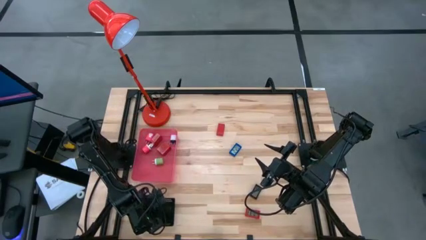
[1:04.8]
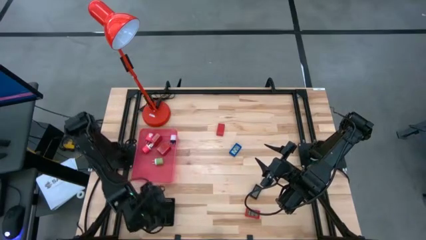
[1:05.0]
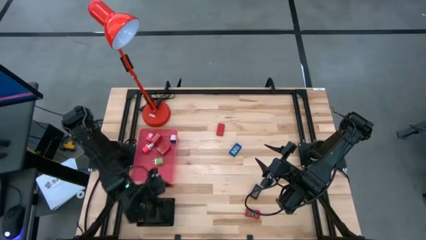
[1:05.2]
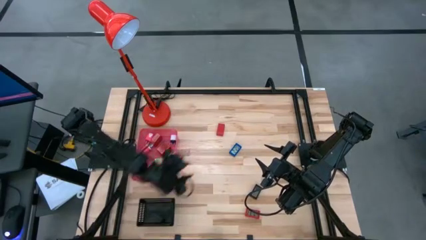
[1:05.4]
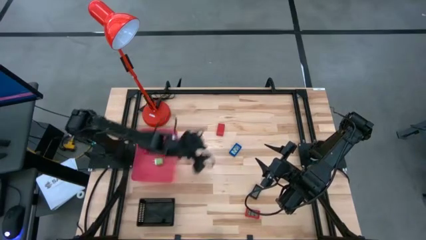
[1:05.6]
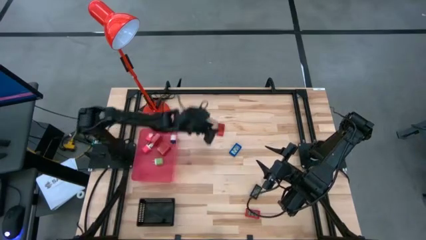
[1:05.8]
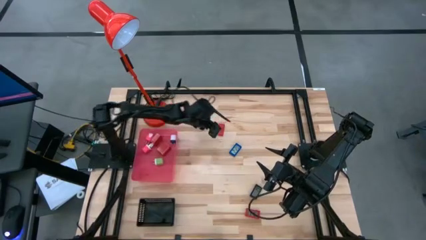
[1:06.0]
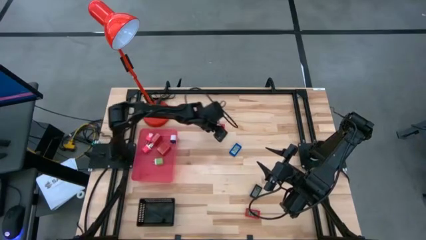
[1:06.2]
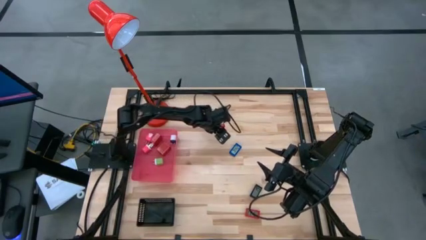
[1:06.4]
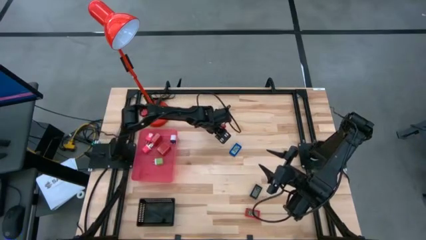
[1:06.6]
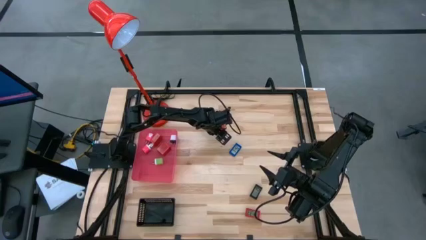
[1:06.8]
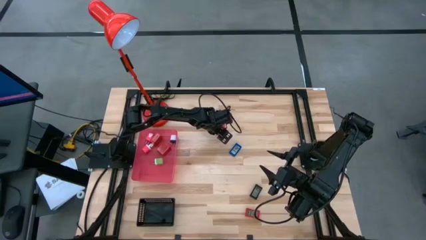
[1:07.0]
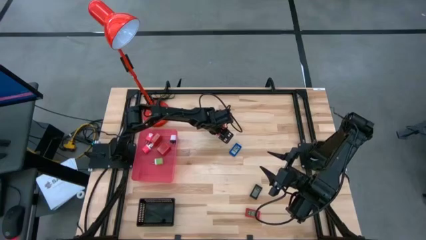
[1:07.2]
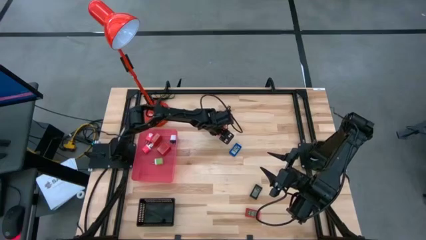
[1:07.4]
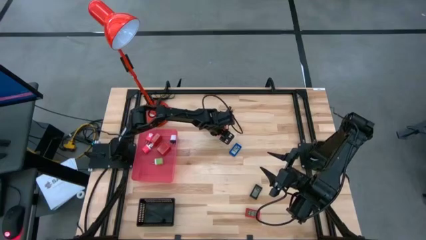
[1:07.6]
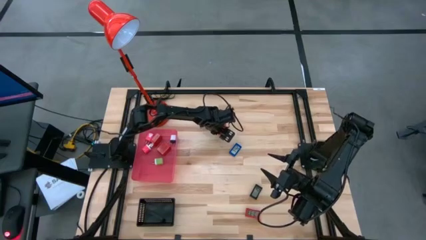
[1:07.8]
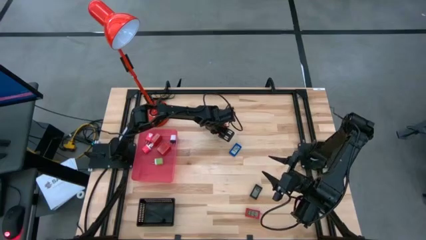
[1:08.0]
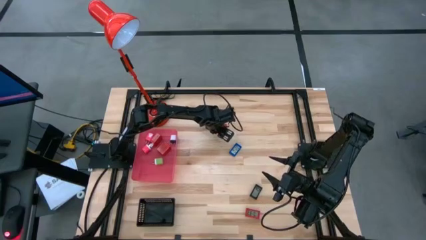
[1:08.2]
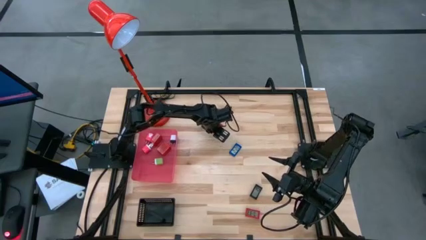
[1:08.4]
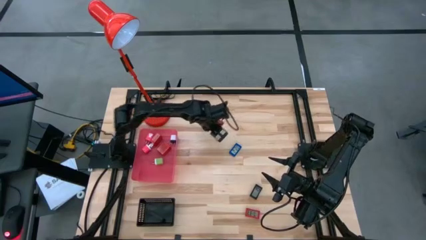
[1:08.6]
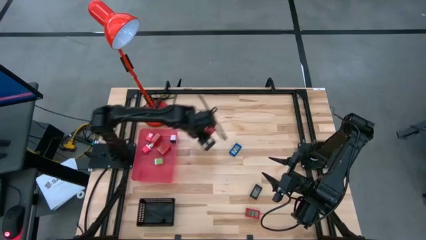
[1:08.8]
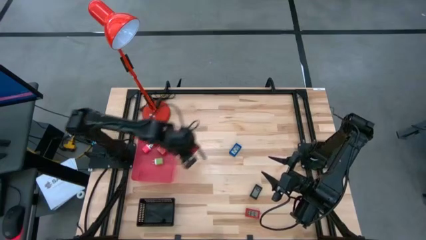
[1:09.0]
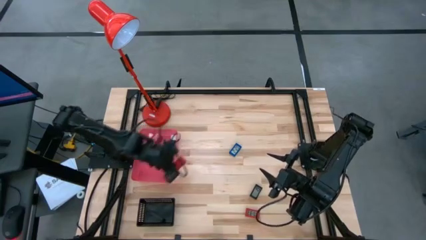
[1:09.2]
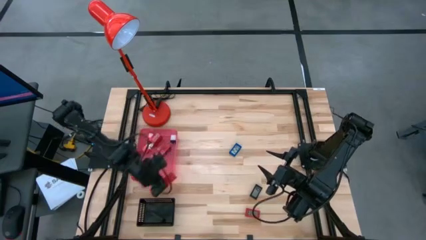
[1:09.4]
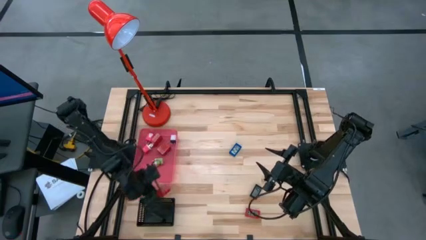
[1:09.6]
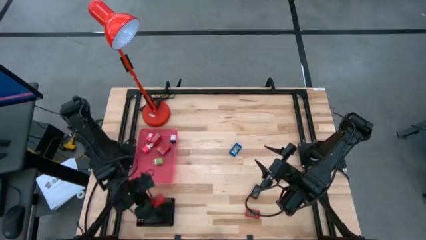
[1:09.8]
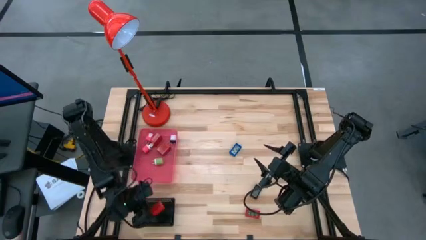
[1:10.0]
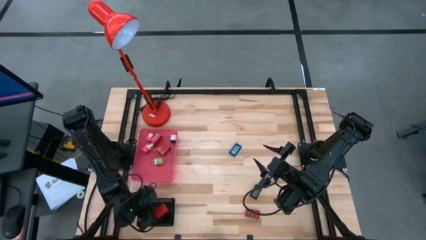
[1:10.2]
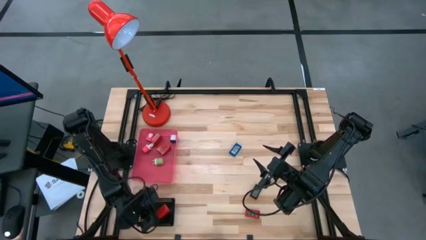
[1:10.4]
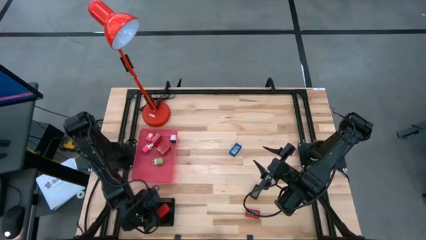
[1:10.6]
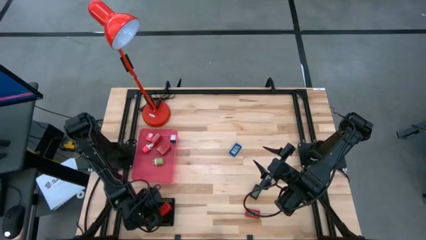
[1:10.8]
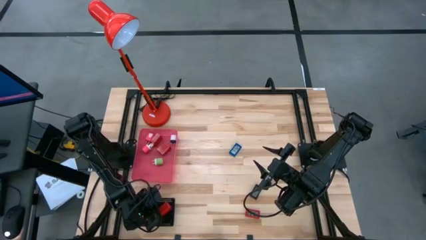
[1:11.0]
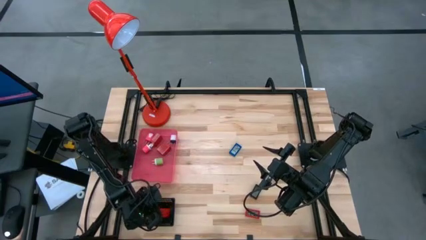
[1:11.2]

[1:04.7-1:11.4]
Task: Pick & Place Office items
Put the top red digital timer into the black bin

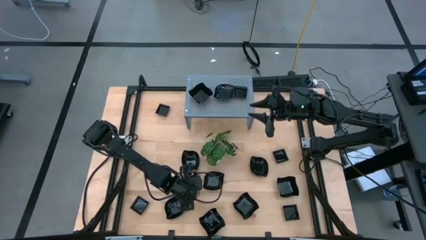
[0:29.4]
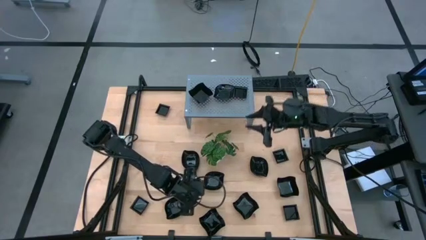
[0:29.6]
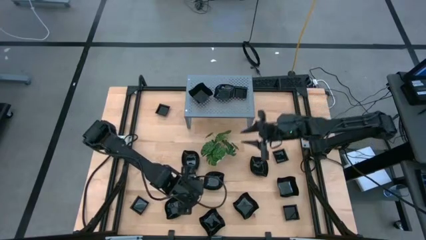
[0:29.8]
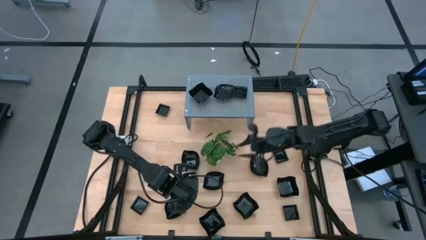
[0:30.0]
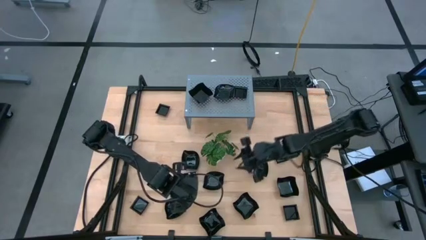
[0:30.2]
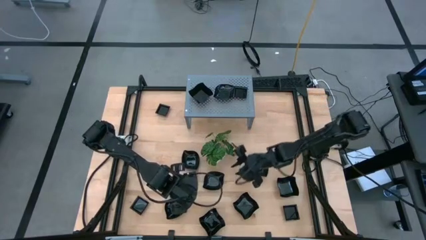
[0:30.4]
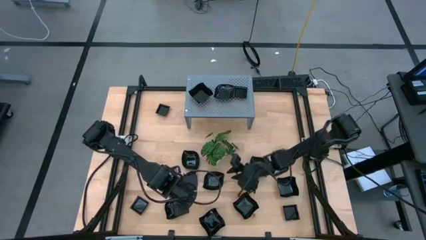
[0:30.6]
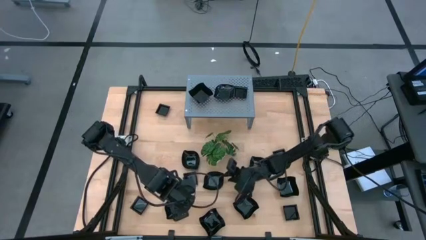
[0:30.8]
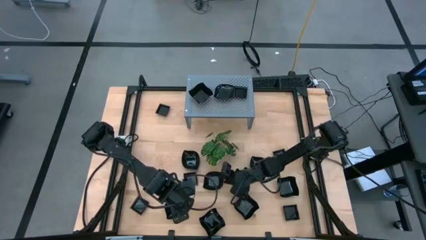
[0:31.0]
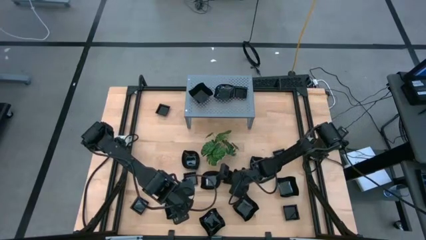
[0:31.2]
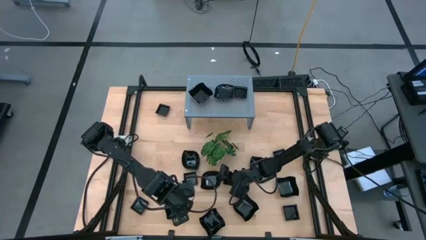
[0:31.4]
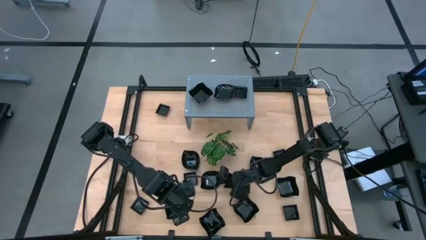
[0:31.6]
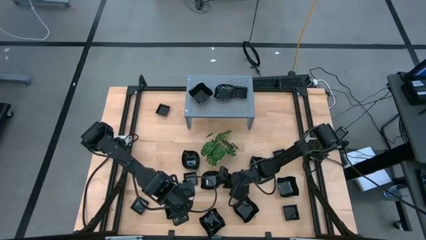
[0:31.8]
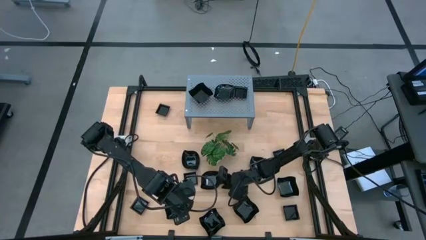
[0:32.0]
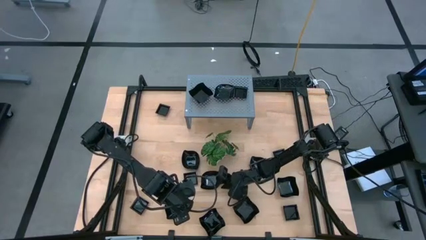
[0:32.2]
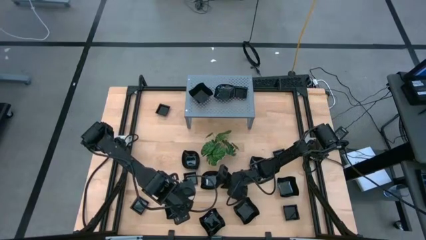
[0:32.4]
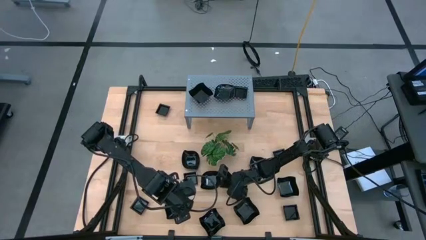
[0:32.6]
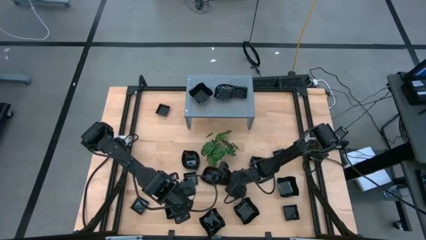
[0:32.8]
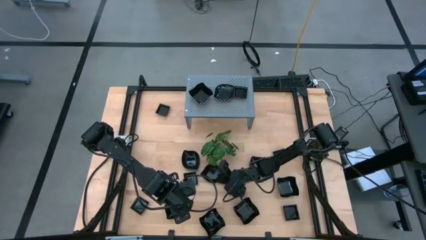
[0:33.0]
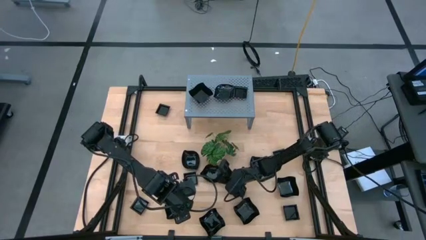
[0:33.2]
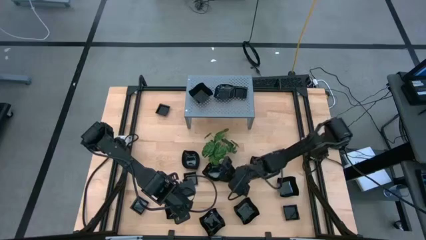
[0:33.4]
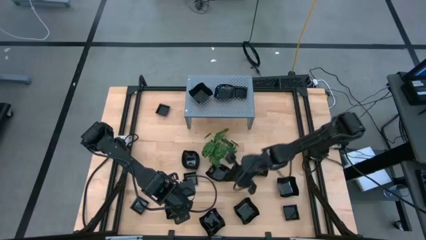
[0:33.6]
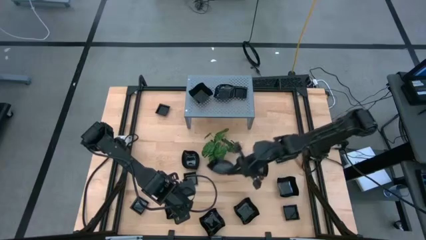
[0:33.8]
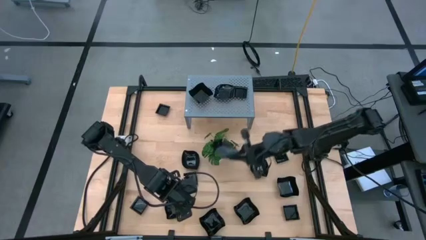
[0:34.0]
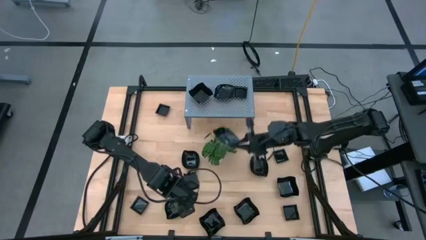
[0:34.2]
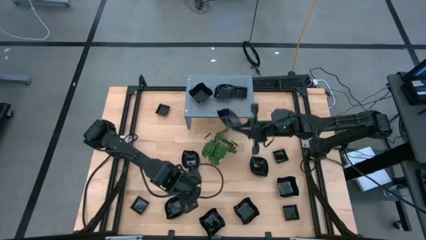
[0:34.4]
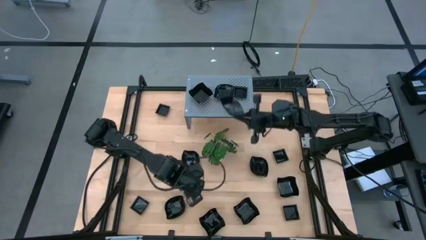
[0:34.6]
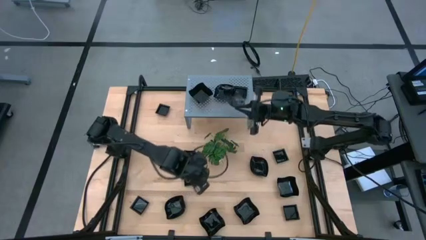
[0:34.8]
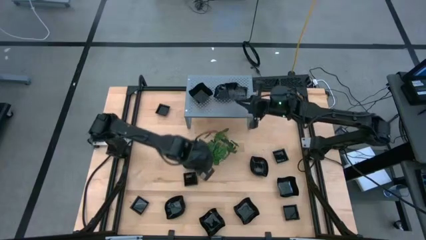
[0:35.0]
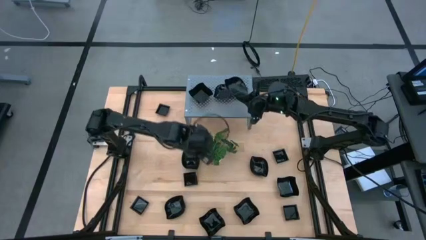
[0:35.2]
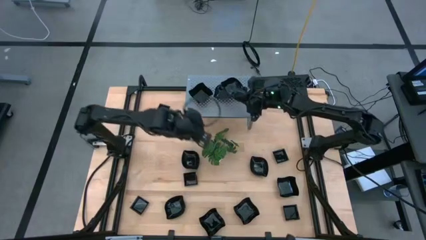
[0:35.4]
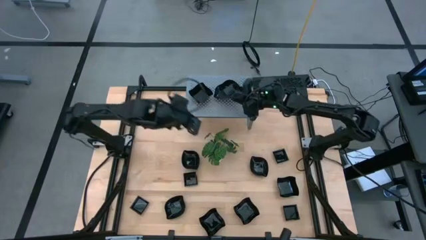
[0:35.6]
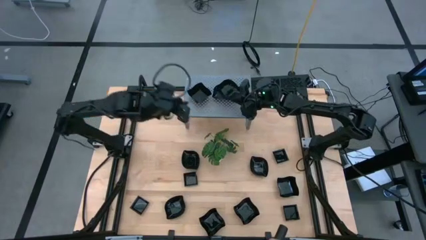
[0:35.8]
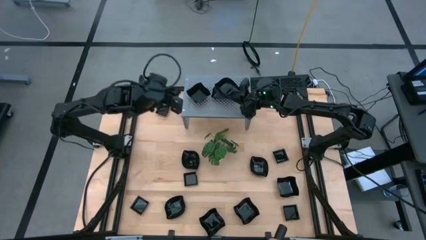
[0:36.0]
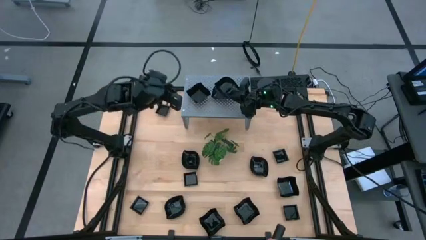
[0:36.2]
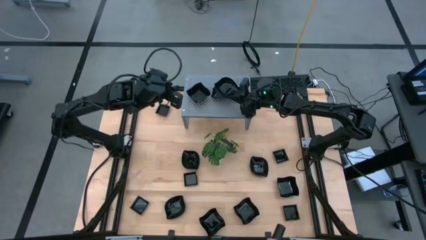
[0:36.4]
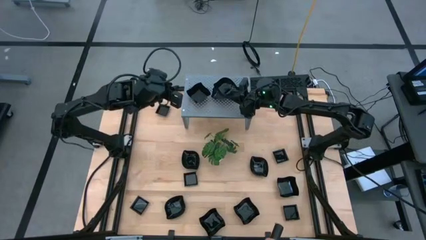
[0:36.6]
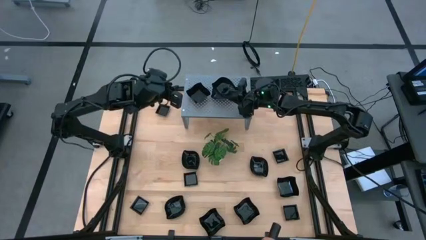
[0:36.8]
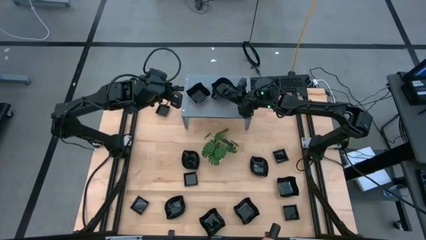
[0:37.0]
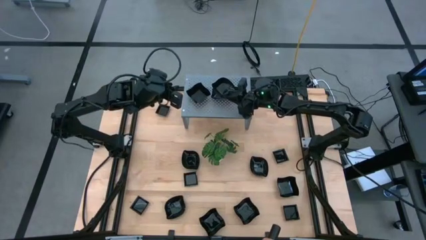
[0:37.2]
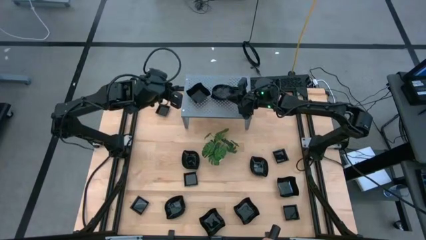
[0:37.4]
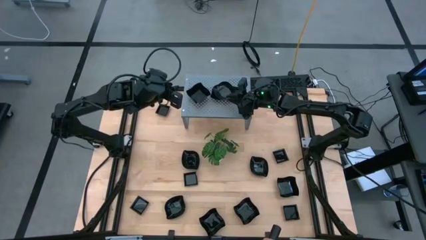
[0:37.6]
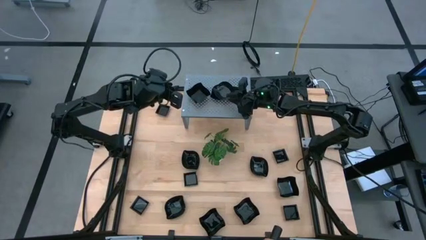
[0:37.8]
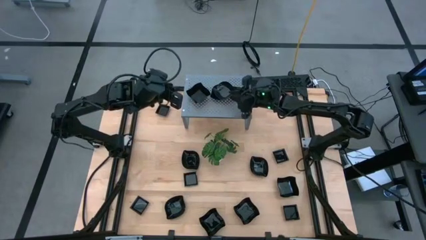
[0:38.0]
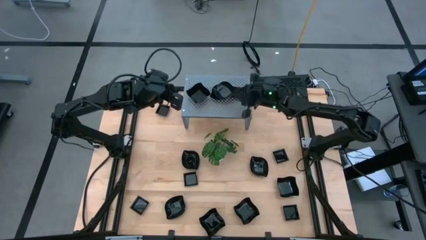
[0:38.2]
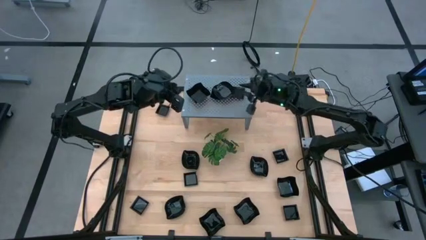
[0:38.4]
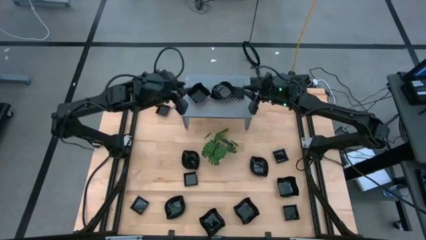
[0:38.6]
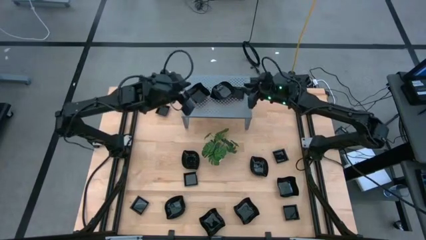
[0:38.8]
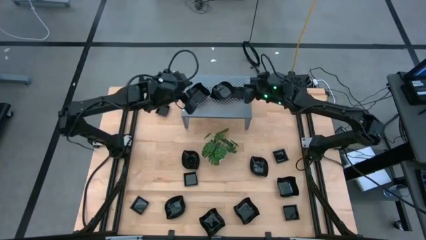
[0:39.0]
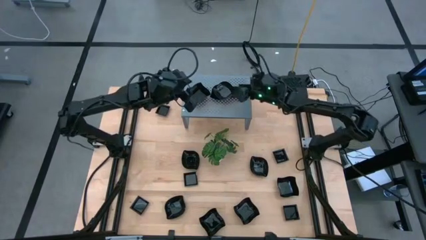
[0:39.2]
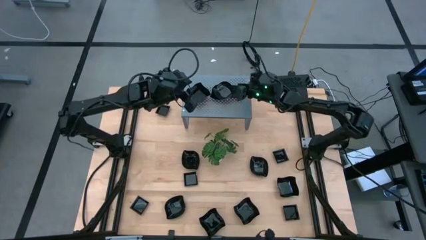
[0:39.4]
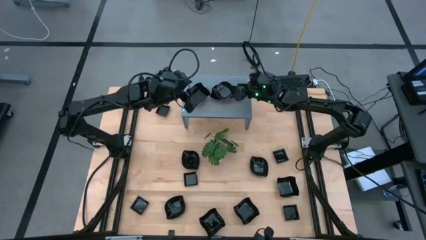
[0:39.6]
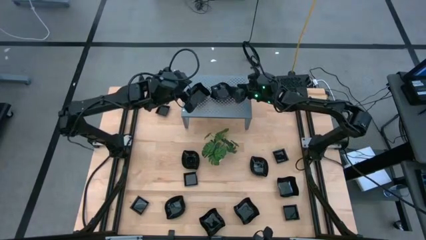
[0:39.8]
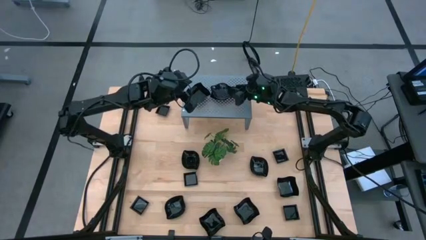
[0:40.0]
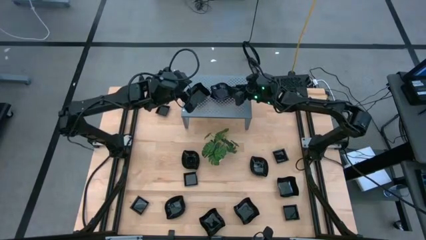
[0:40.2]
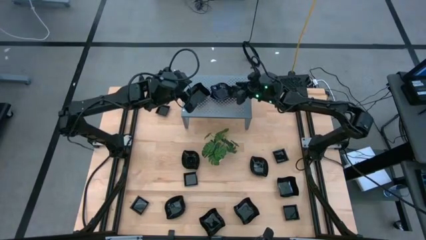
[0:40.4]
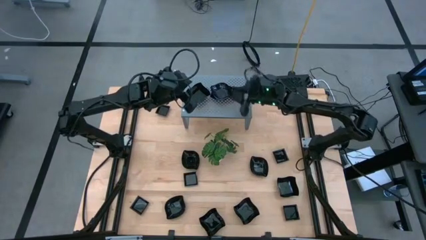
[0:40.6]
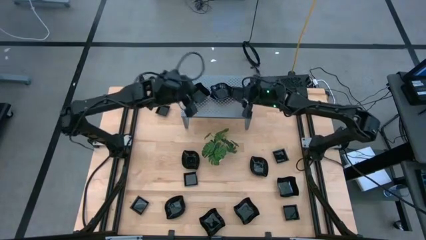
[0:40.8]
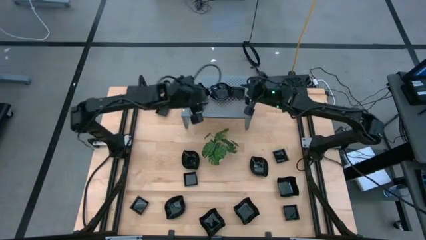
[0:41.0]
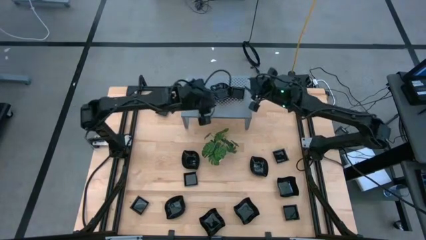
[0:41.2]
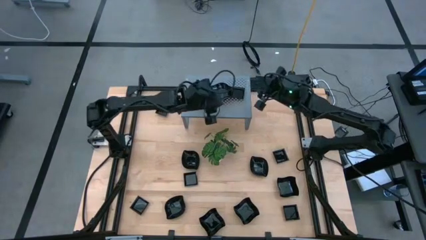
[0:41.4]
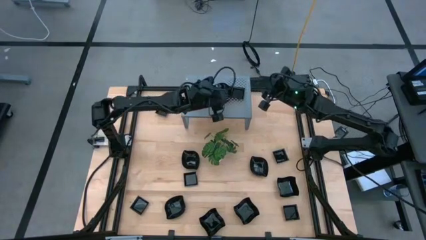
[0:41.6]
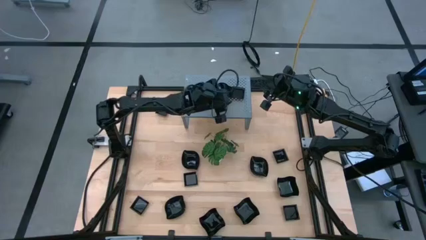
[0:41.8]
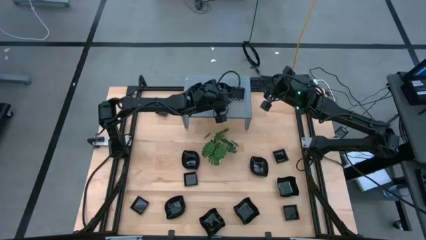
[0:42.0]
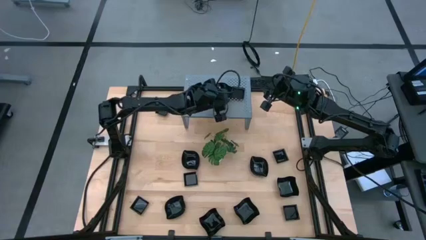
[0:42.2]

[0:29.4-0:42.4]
Task: Pick & Place Mini shaped plates
Stack the leaf-shaped plate on top of the leaf-shaped plate on the shelf
